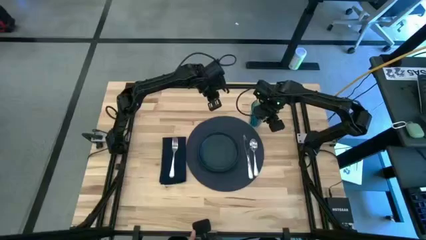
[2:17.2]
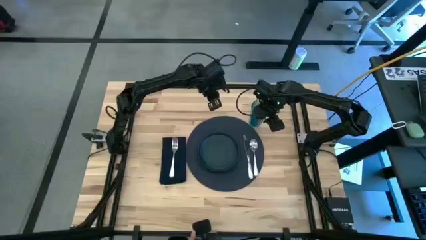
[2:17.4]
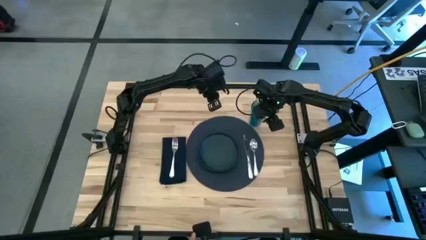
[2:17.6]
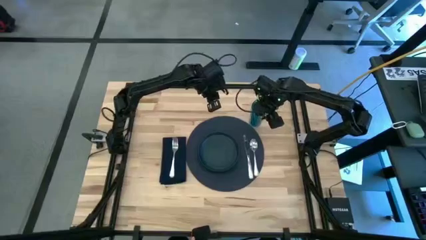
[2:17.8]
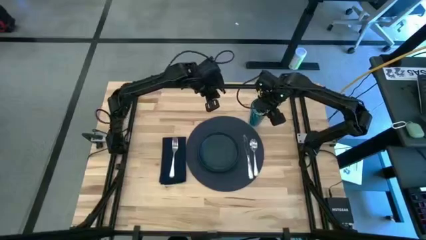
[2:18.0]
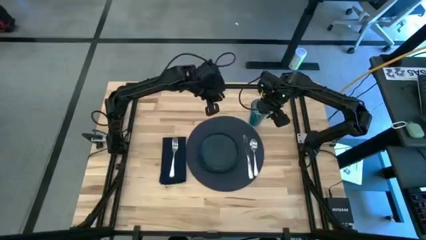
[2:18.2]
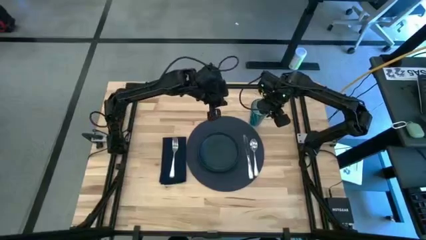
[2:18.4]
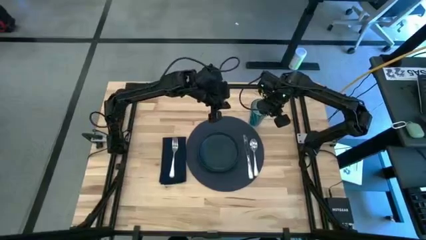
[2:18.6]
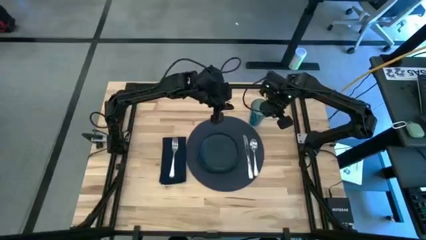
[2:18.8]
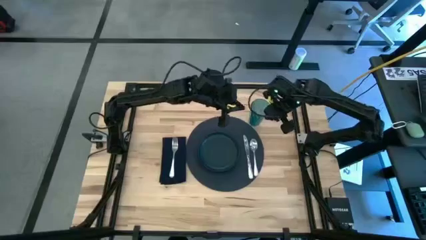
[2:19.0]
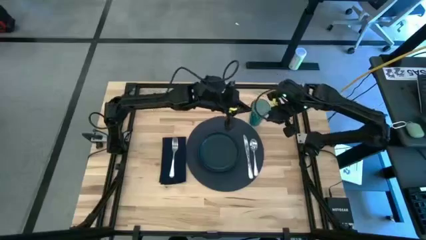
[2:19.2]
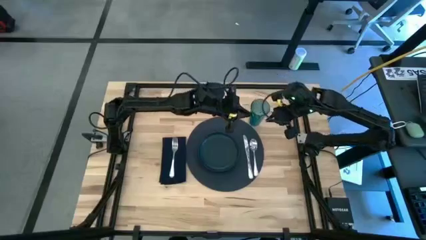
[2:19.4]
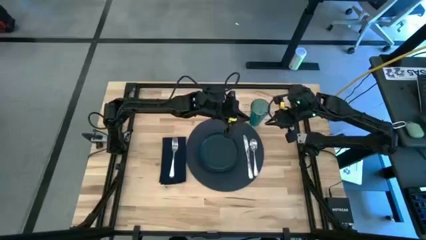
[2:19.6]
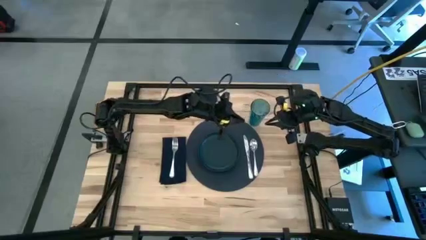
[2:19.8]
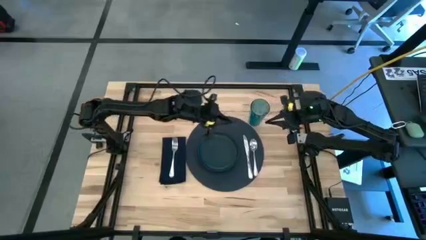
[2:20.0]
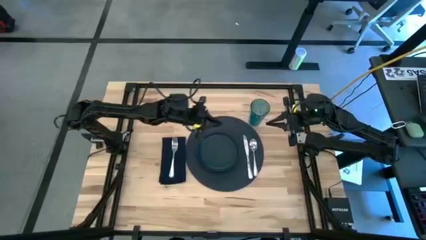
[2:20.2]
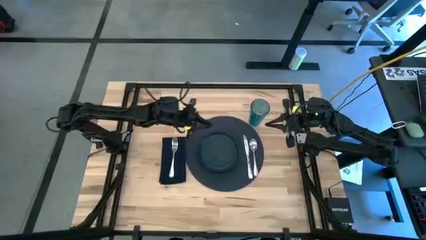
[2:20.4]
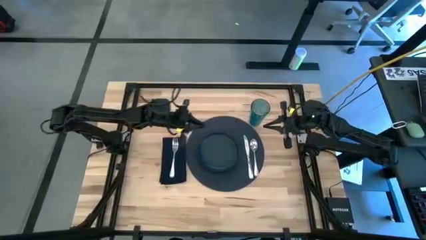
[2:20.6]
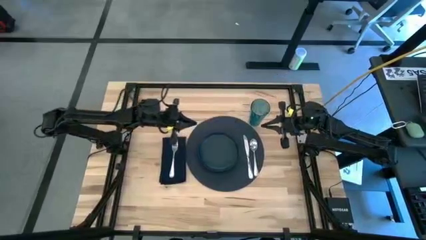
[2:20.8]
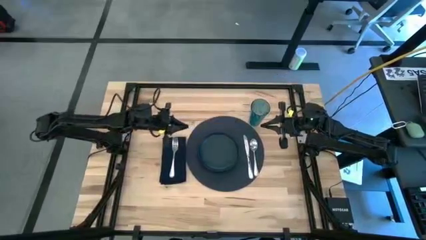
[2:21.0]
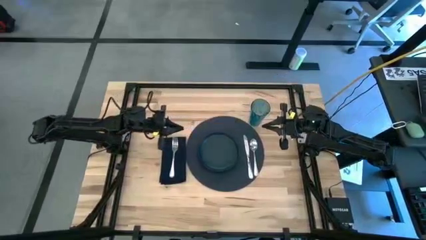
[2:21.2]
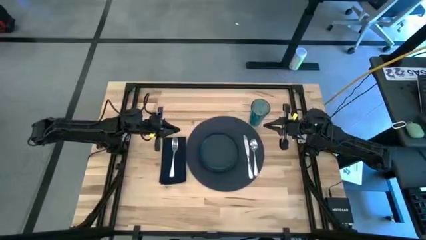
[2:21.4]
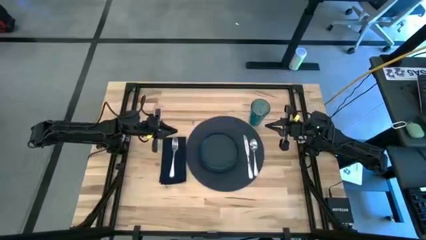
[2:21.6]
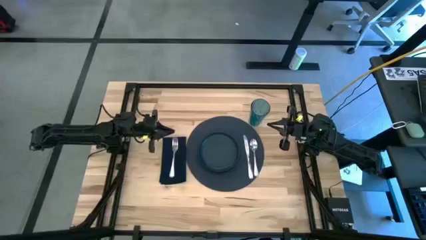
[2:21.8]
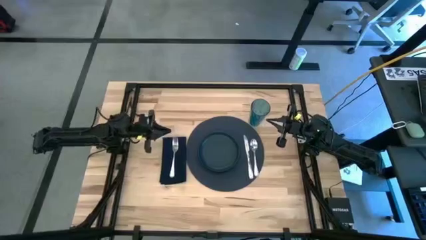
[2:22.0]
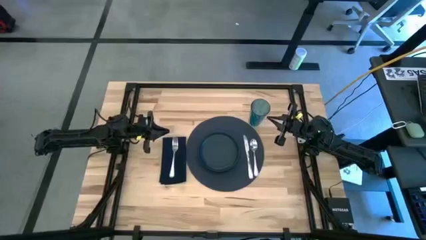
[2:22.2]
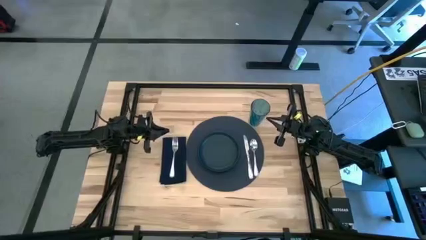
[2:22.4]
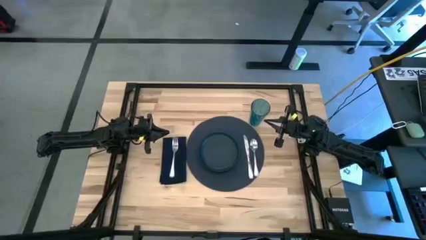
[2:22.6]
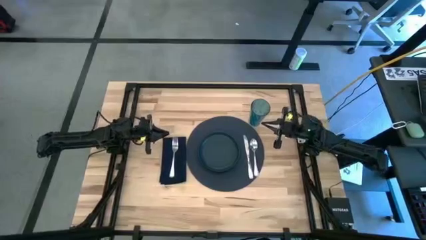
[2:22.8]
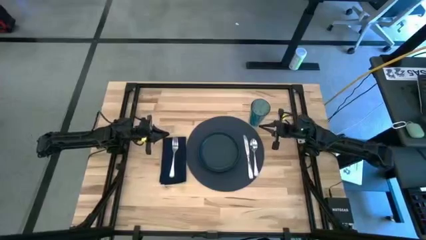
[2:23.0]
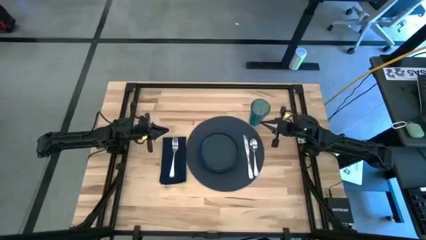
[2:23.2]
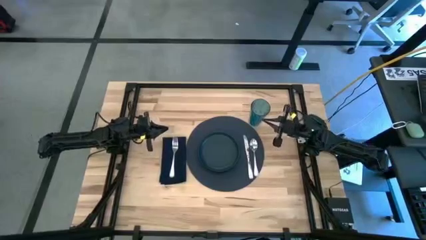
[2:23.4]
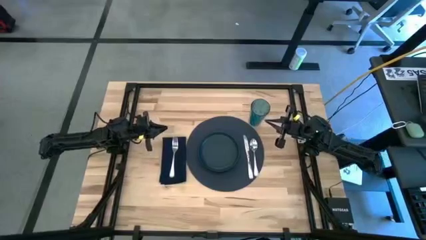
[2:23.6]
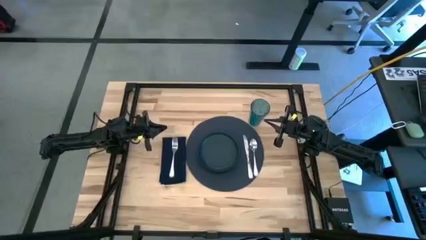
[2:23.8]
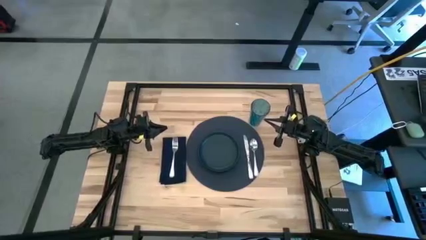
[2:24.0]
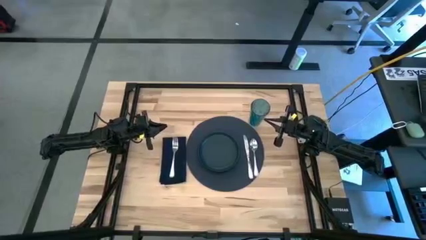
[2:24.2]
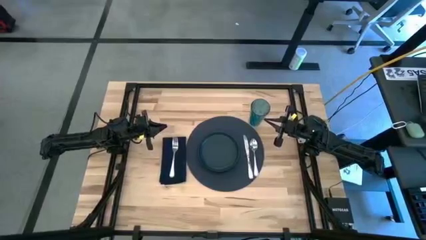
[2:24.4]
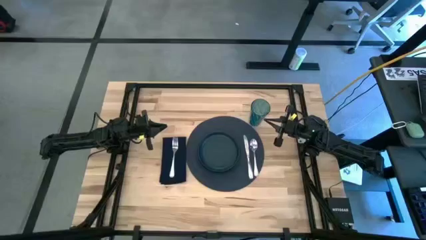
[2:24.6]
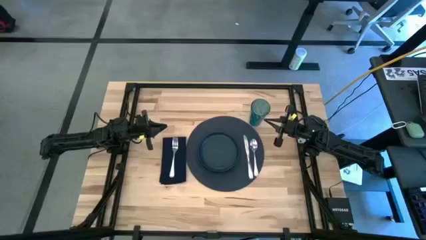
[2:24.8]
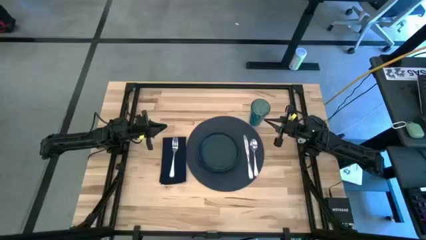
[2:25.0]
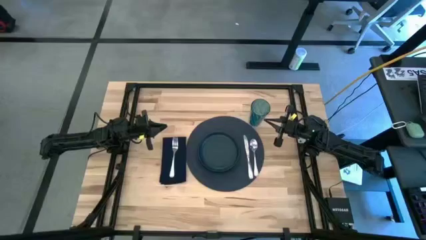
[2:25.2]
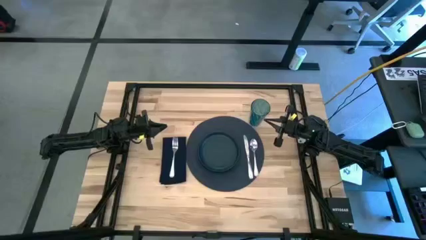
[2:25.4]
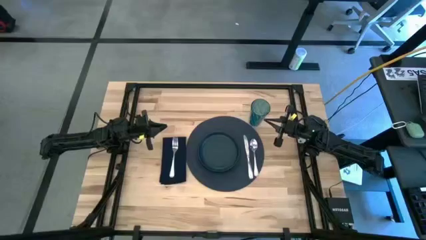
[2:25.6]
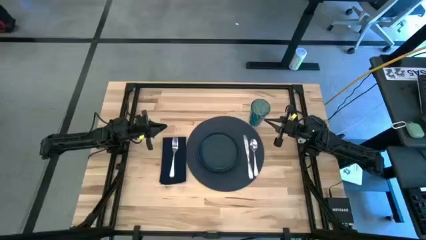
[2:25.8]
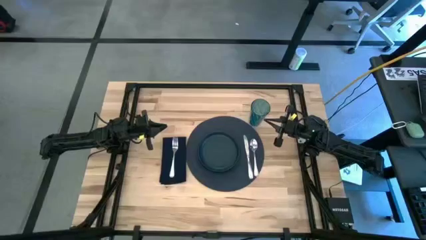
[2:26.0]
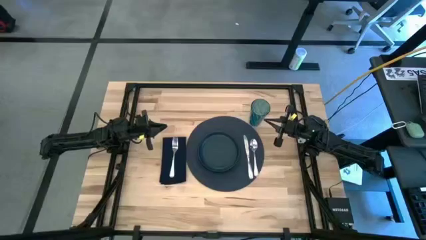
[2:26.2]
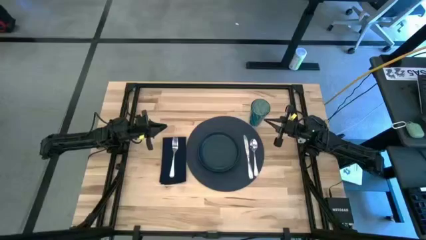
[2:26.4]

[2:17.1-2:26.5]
Task: Set table place
Return to Home Position

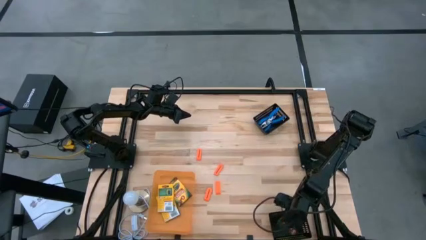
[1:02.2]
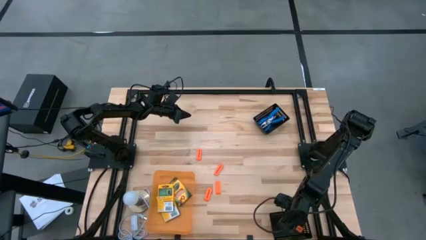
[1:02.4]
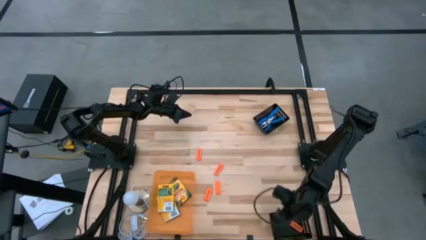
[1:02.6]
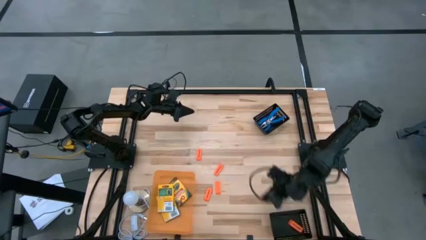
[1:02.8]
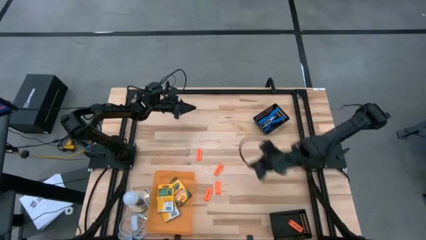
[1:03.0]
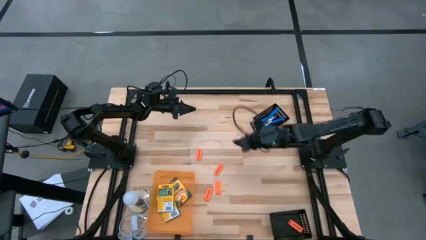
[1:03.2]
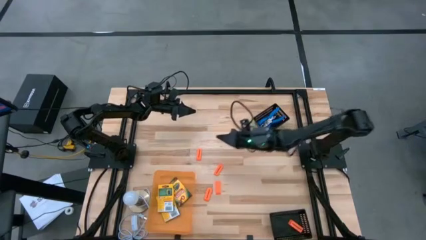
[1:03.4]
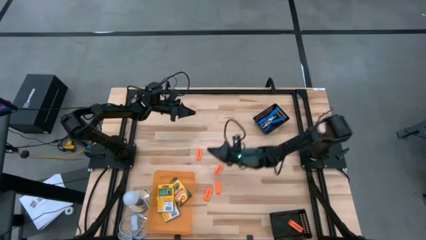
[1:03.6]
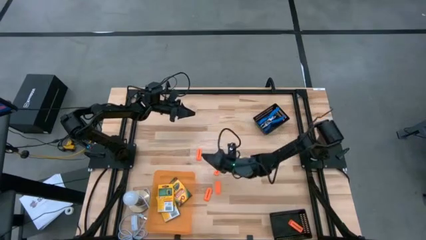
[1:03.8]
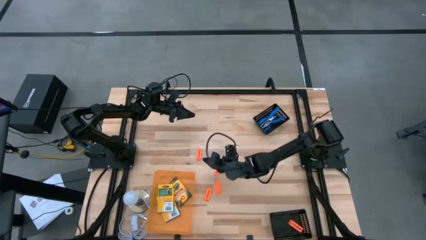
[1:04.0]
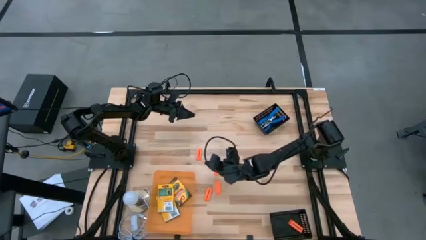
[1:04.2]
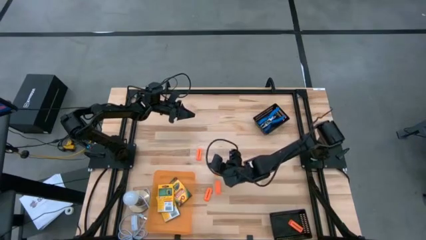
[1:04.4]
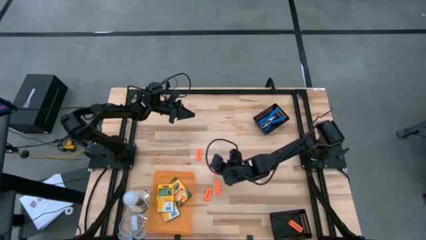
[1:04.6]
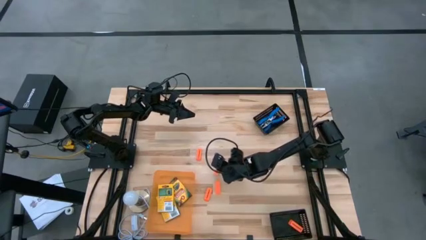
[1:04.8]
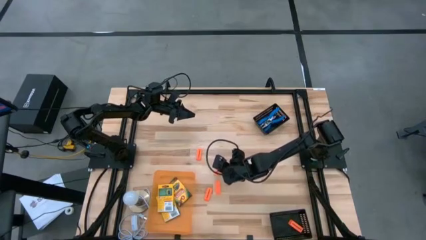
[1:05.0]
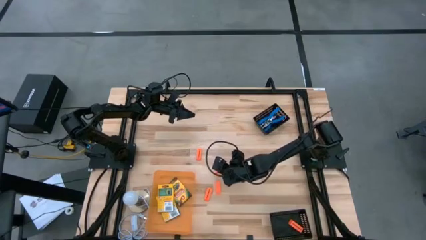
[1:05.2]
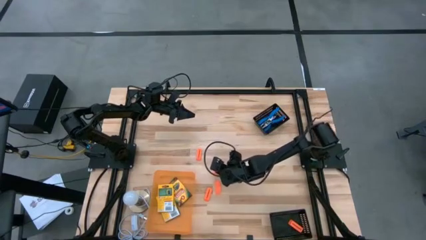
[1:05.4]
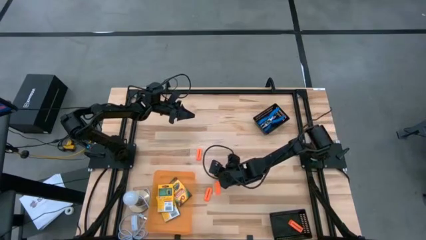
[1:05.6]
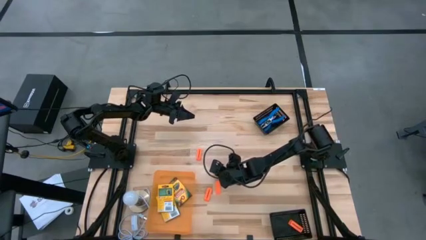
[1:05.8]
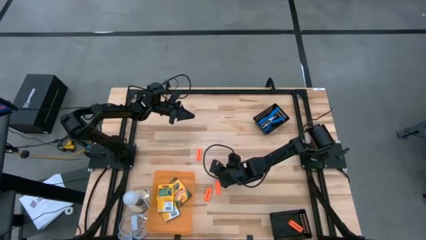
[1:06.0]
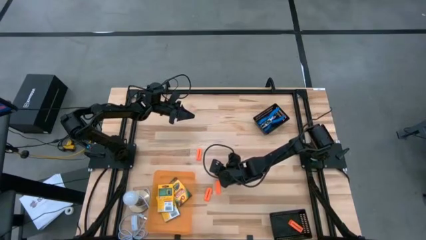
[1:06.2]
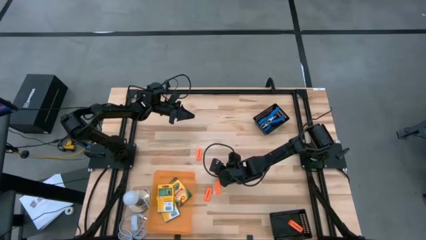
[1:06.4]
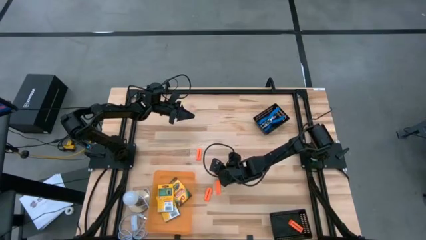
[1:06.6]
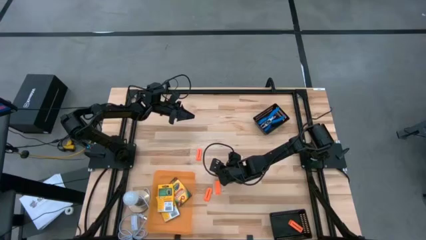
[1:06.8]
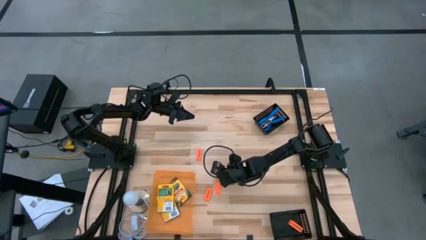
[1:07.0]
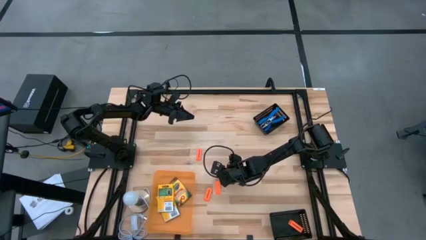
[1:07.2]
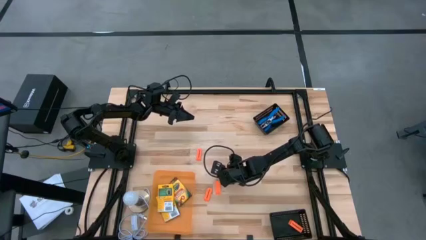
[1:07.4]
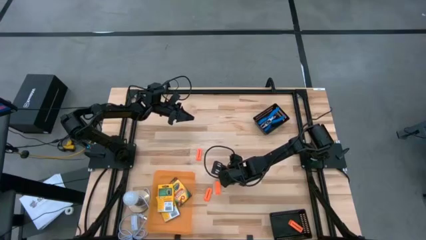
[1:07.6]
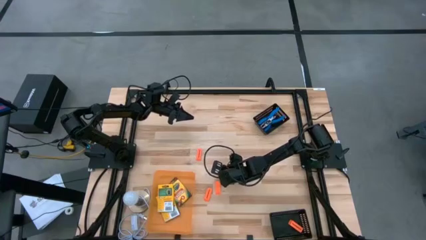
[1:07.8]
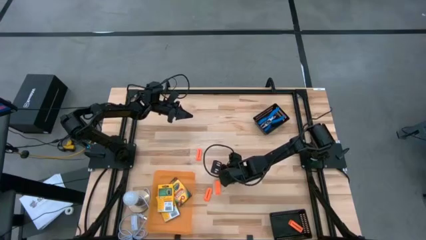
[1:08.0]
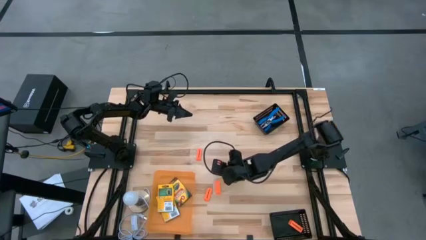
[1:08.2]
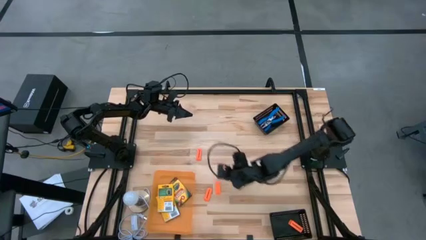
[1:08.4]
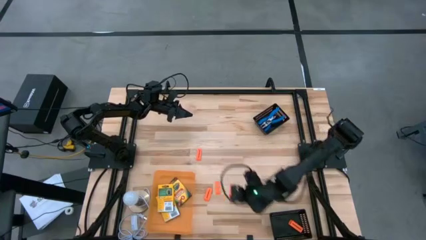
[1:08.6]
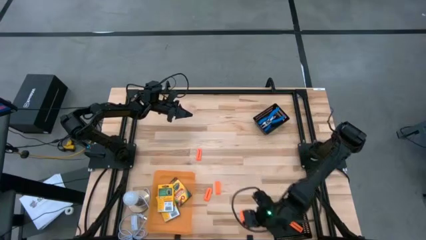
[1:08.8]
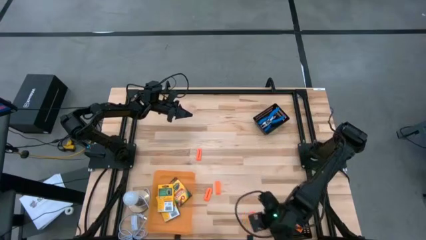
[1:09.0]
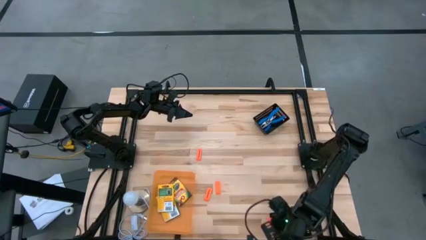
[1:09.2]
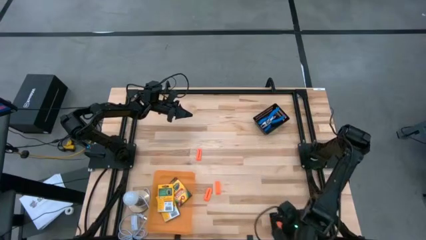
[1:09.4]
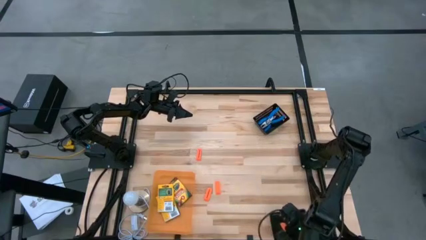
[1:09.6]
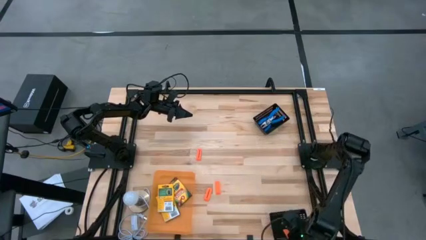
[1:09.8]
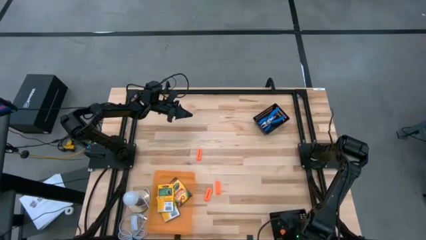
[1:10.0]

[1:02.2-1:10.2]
Task: Pick & Place School Supplies
Put the orange eraser into the bottom black bin
